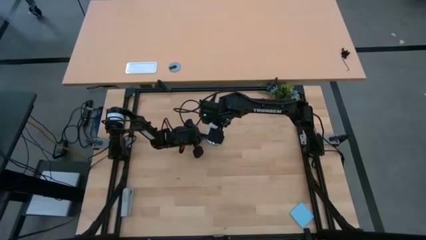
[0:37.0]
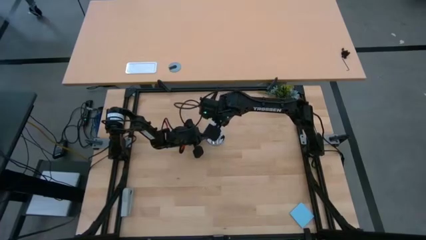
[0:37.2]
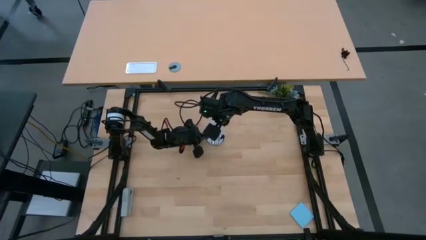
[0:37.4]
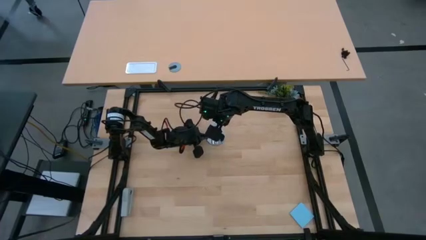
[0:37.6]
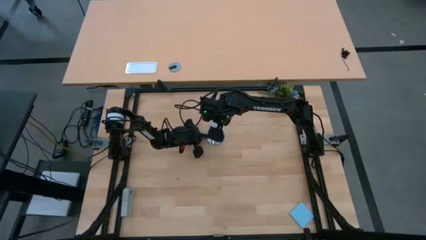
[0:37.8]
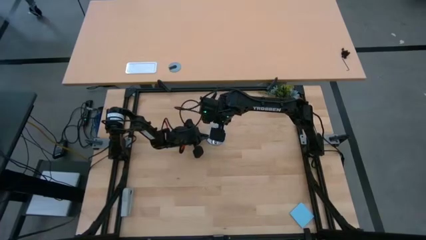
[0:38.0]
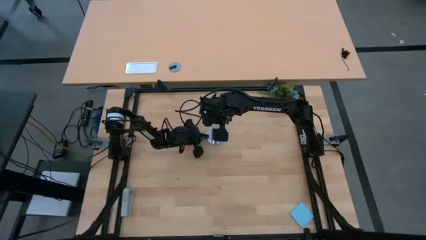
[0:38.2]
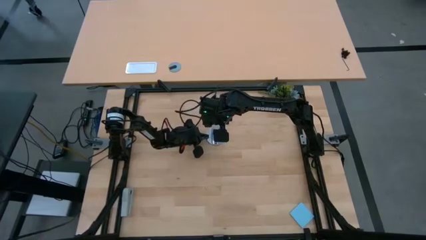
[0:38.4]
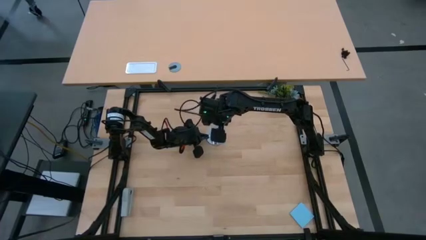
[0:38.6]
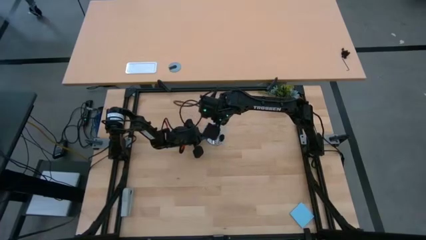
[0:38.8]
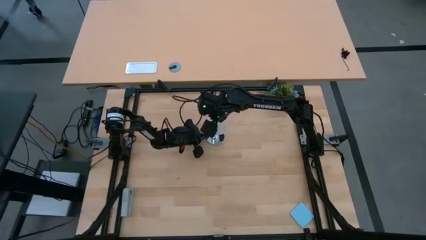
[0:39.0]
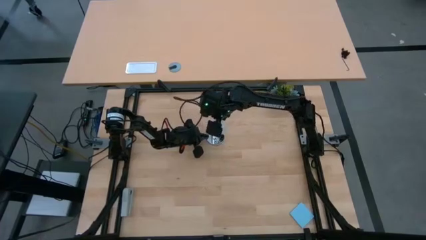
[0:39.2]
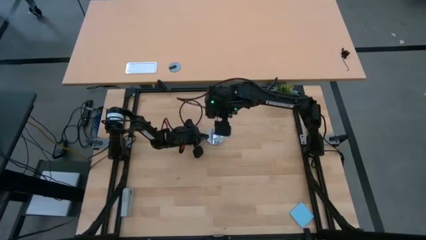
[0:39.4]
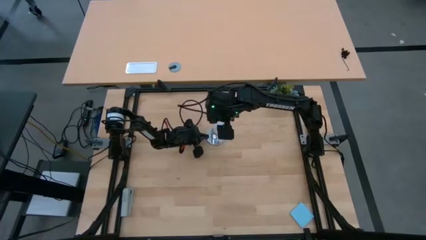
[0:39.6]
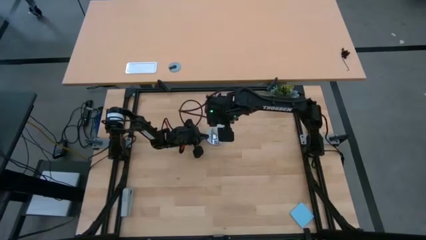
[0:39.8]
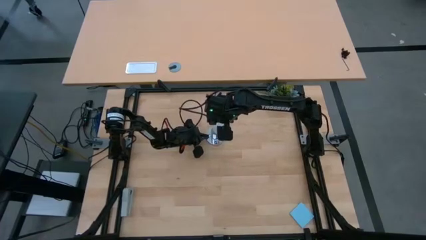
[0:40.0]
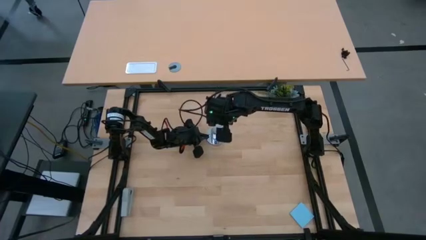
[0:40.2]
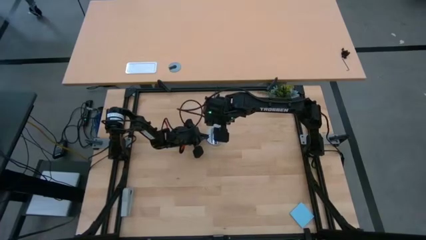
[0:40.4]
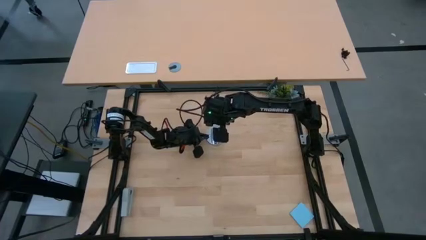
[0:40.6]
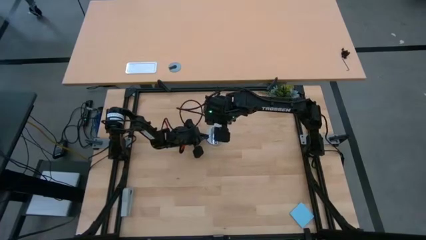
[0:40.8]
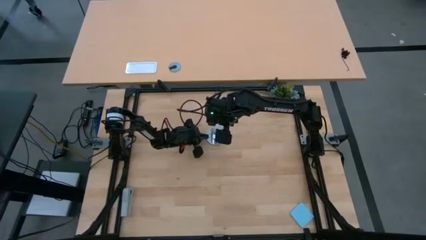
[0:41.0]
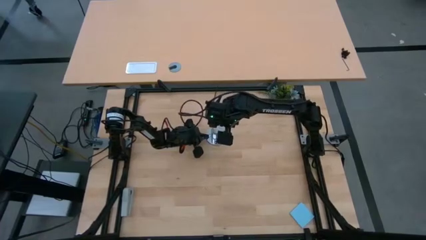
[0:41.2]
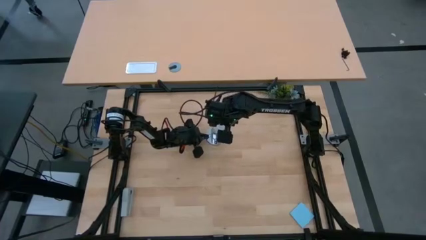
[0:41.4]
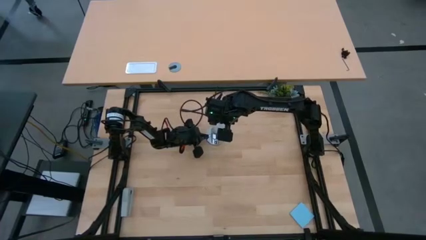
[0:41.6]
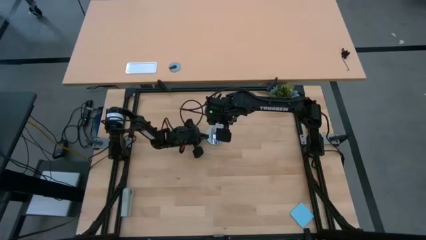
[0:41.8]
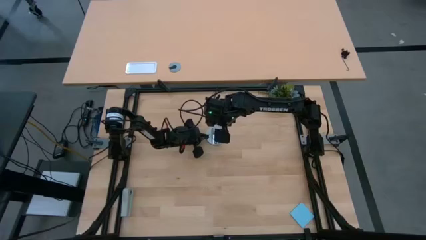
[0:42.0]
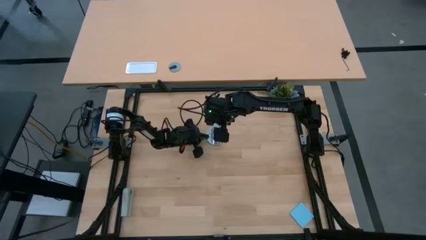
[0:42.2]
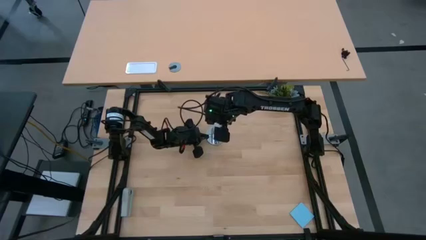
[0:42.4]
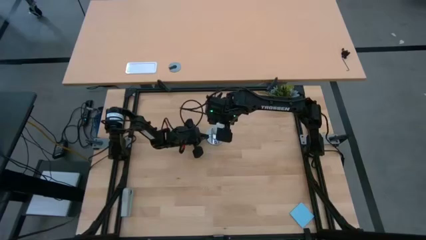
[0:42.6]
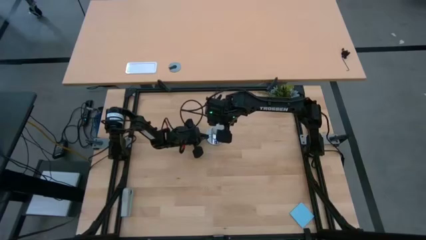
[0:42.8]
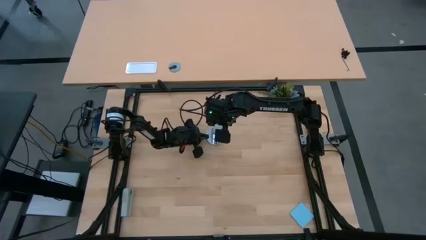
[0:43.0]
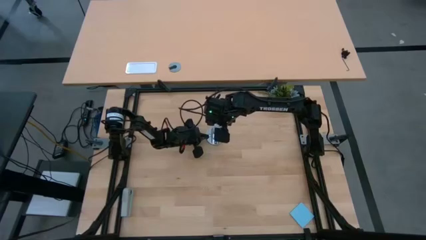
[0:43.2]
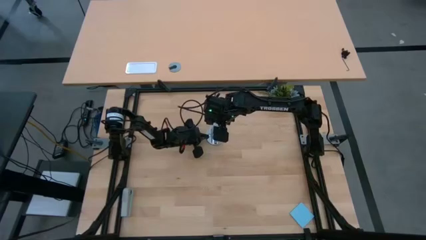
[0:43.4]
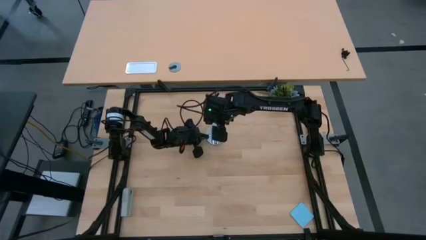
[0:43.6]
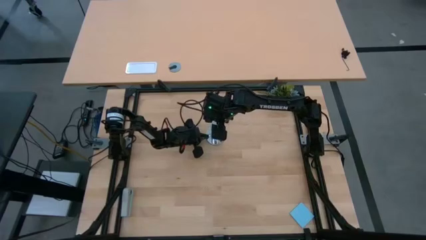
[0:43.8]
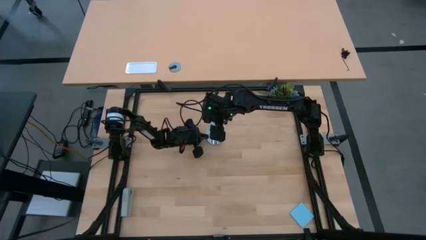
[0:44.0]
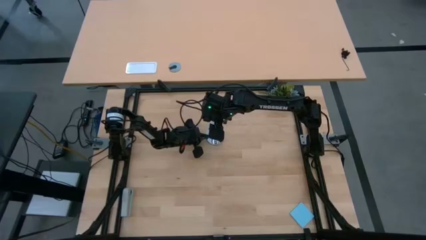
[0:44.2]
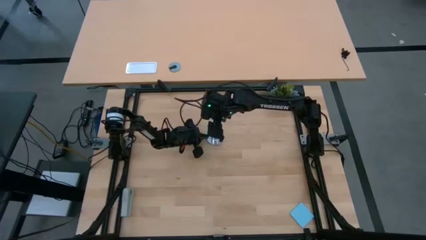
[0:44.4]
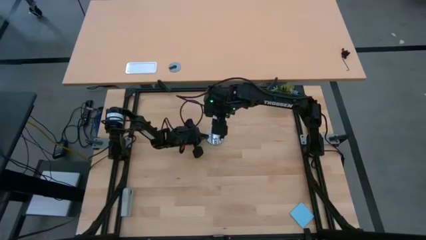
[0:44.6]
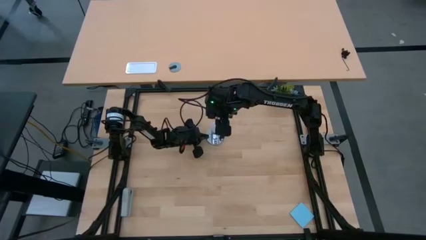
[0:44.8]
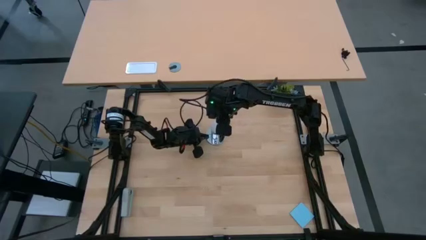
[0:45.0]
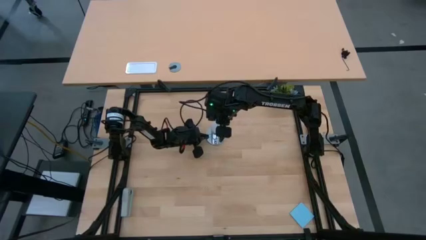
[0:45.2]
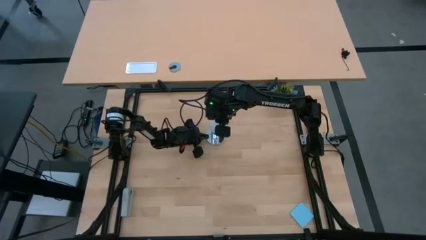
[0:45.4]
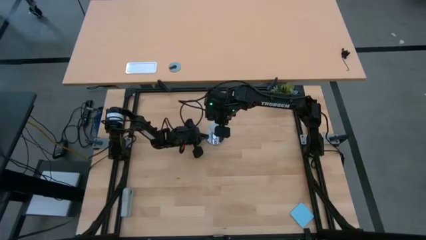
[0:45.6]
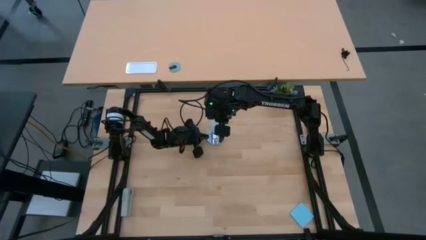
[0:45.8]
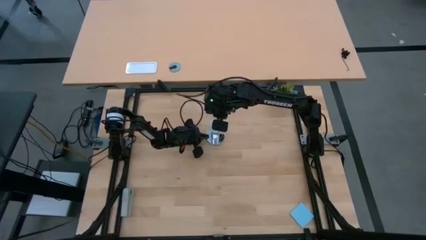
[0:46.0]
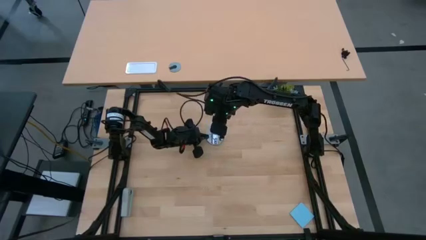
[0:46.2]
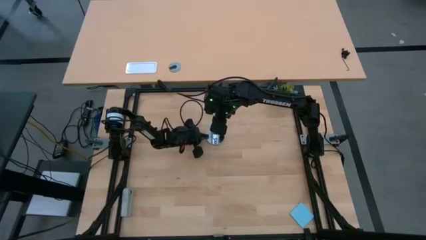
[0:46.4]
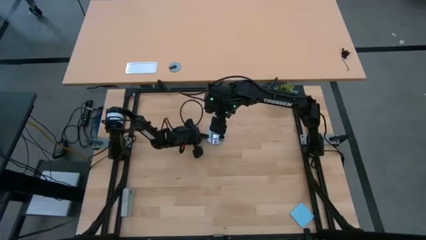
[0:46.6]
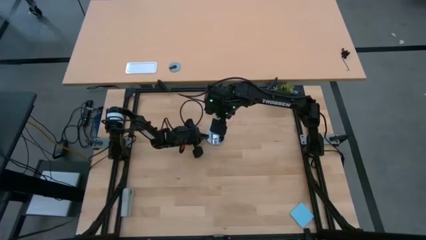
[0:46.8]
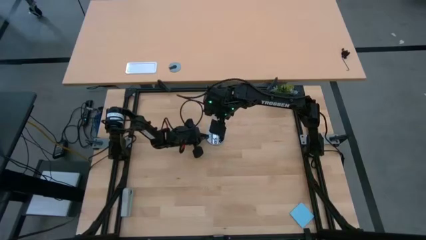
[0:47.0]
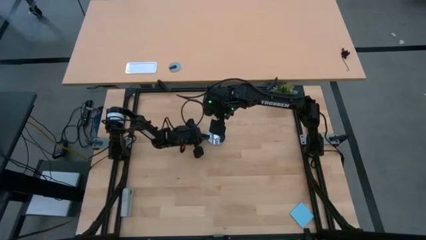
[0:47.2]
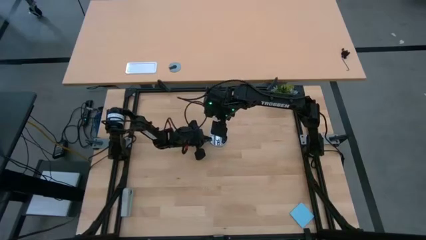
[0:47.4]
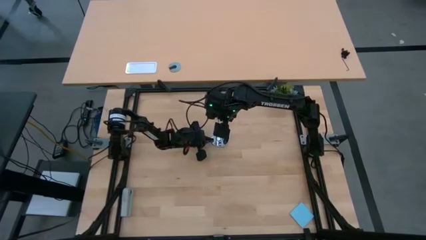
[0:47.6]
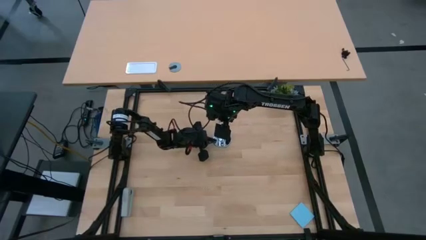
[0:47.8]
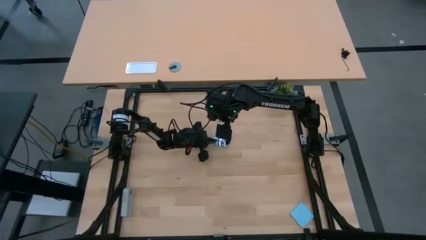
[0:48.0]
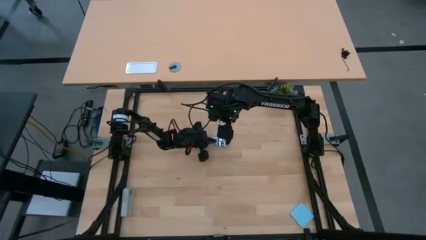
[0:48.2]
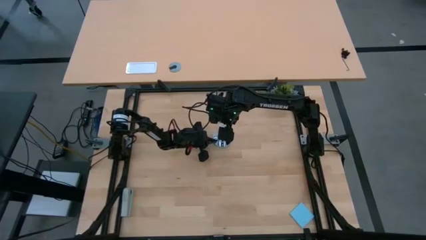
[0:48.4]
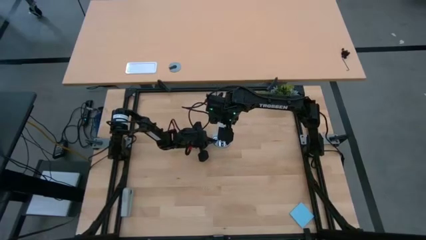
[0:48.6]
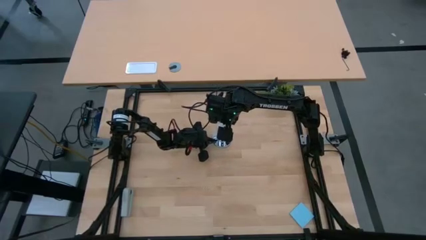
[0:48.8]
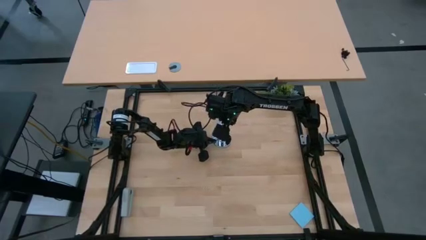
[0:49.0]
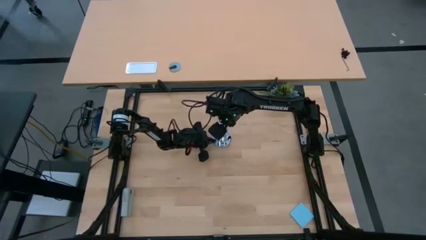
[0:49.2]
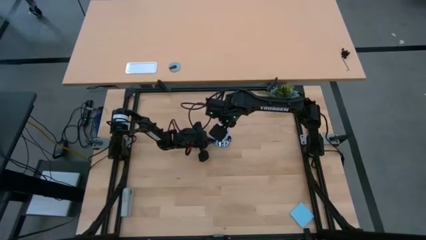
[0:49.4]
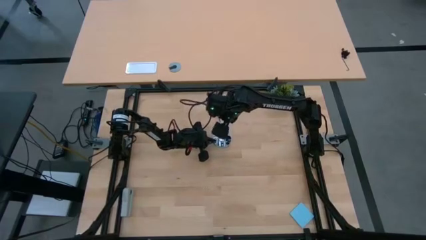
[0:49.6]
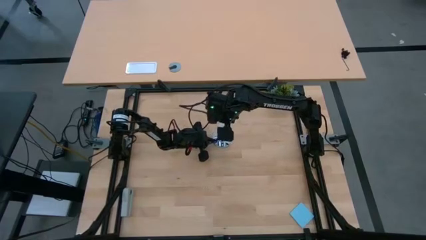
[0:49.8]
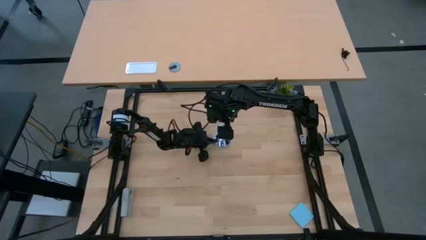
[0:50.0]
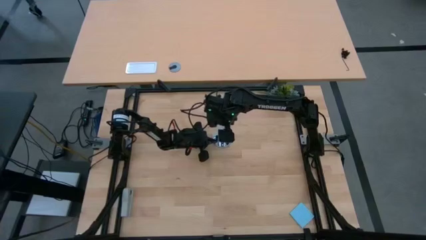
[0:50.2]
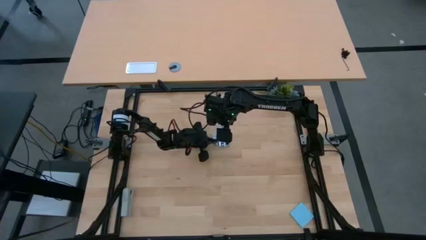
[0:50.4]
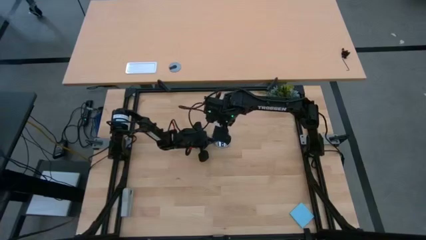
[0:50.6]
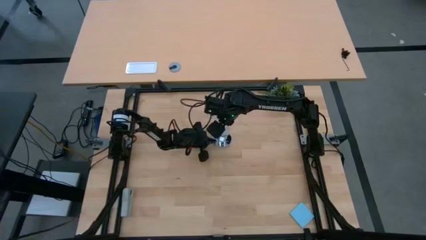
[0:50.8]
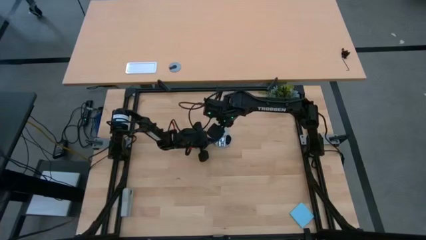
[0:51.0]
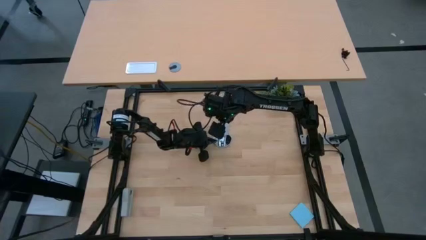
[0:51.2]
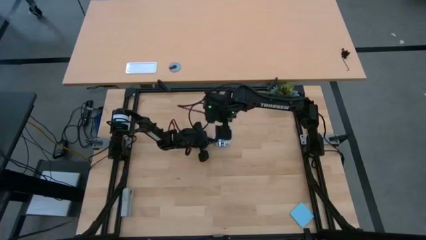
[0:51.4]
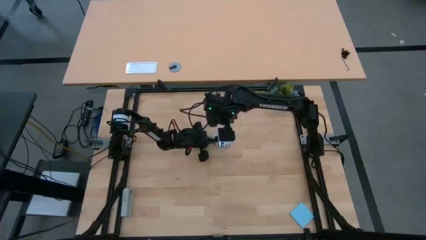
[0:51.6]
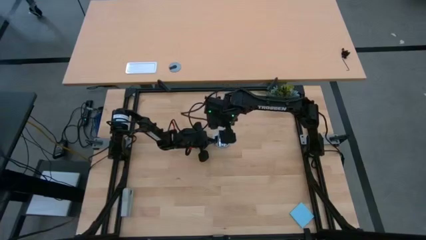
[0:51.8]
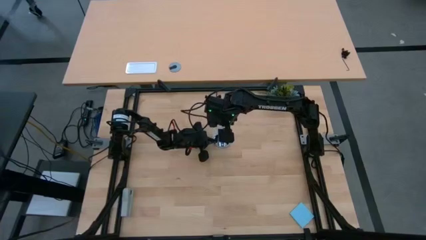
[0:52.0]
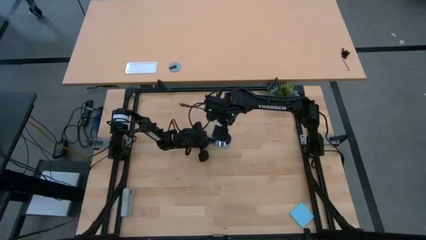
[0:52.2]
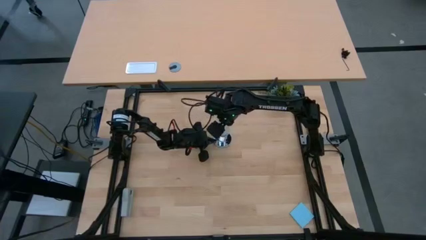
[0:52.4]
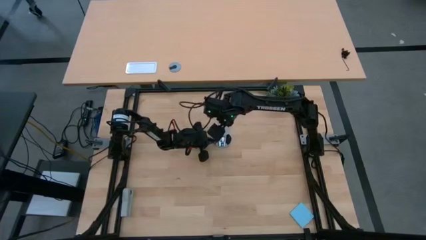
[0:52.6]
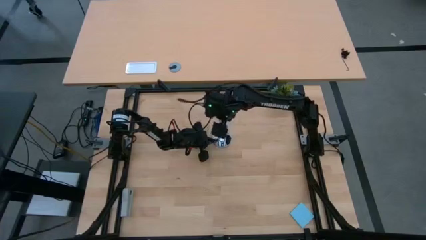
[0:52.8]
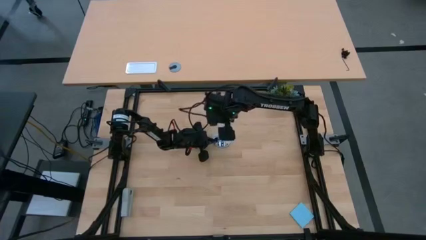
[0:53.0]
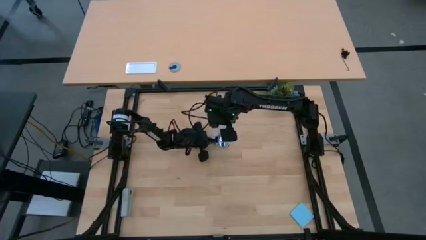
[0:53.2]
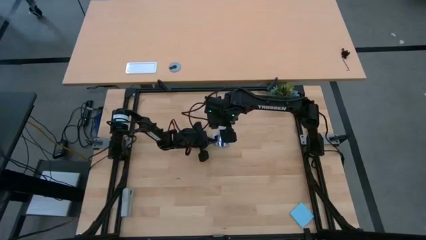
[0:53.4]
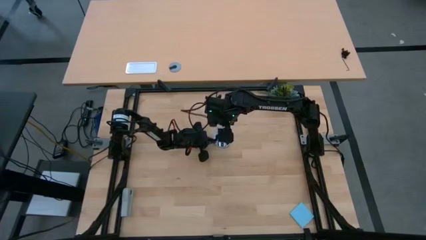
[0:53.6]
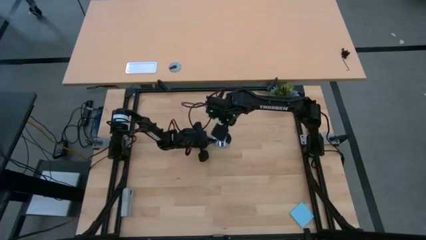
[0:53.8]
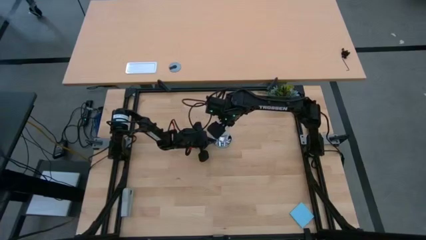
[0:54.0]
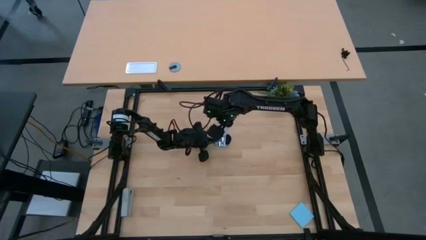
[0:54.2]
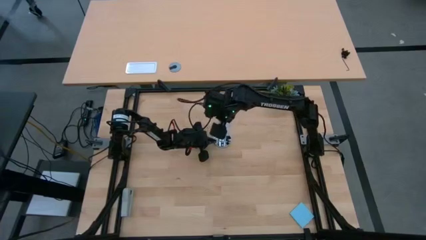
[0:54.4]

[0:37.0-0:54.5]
Task: Screw lightbulb
Insert the lightbulb into the lamp socket
